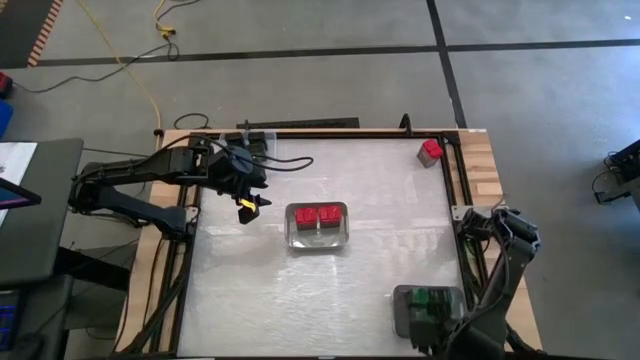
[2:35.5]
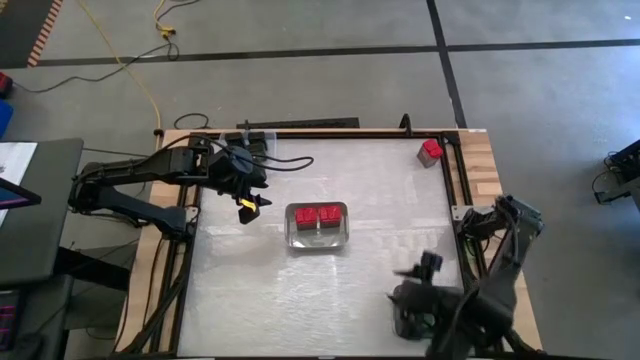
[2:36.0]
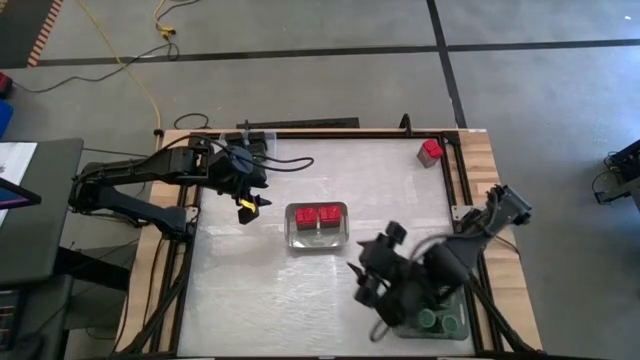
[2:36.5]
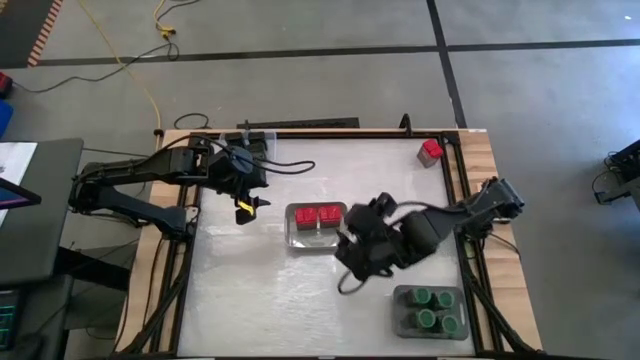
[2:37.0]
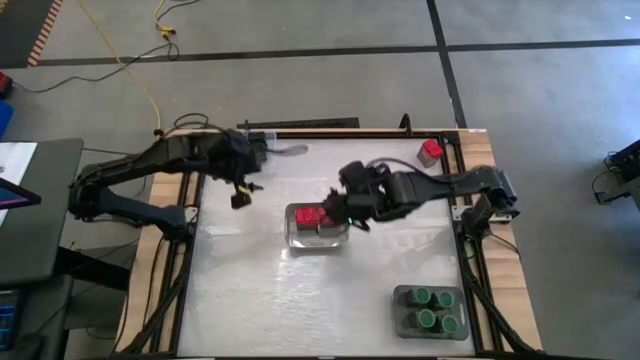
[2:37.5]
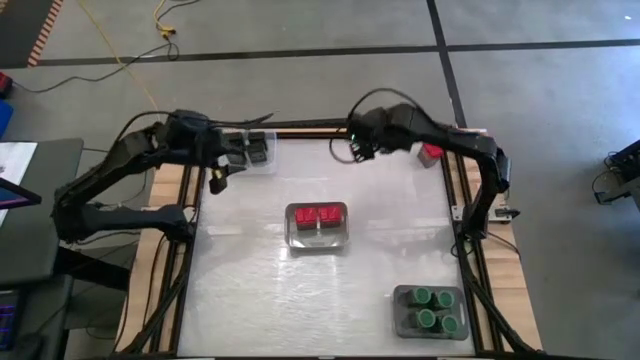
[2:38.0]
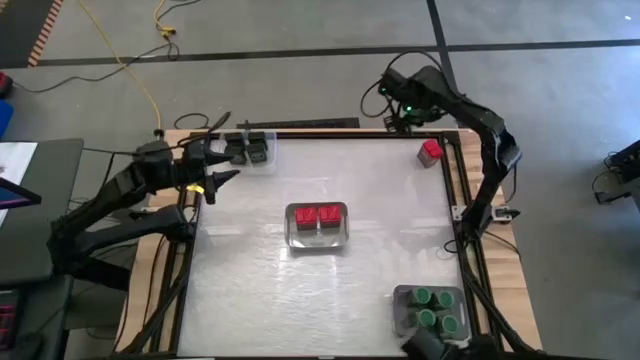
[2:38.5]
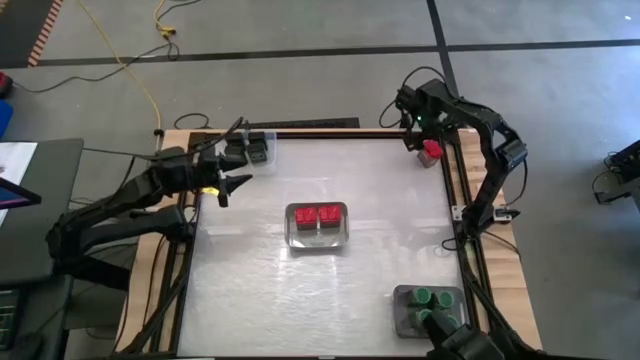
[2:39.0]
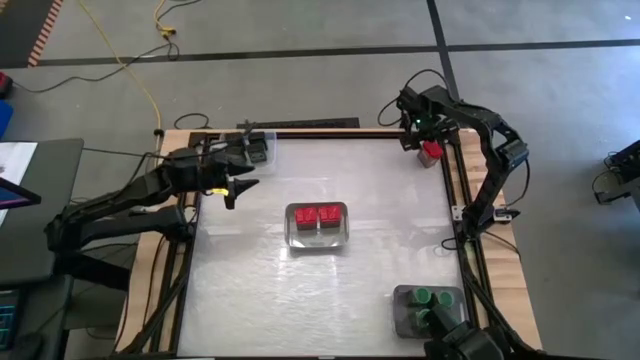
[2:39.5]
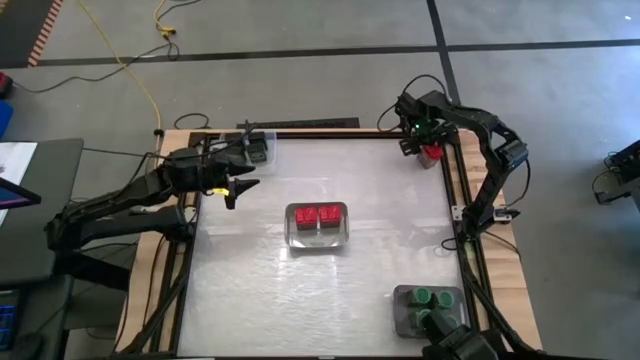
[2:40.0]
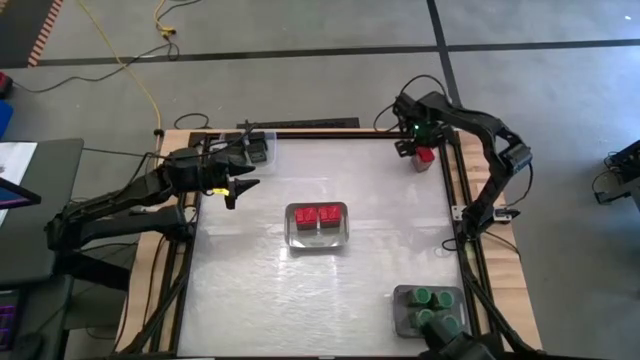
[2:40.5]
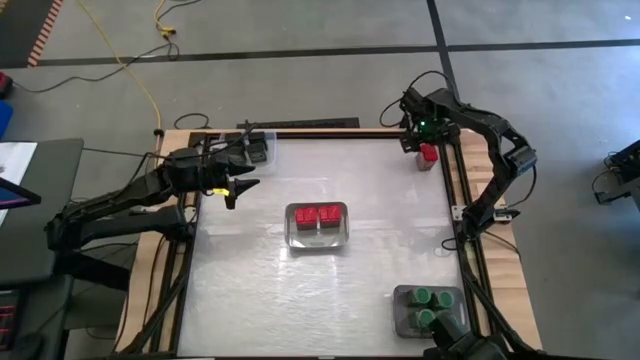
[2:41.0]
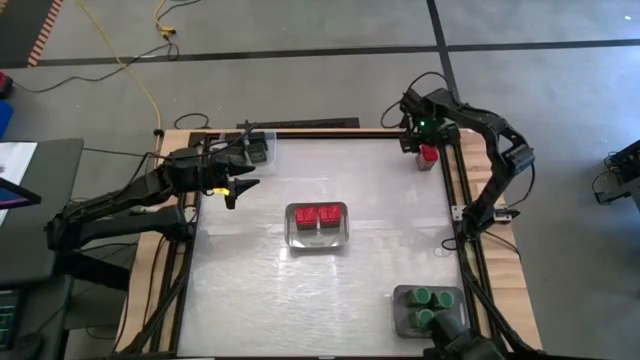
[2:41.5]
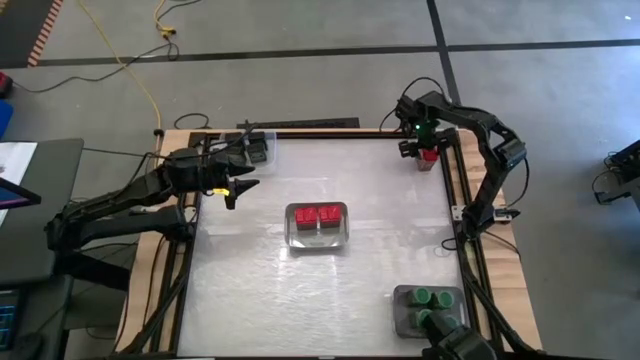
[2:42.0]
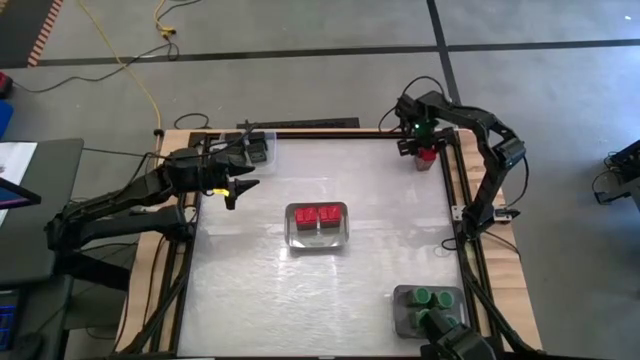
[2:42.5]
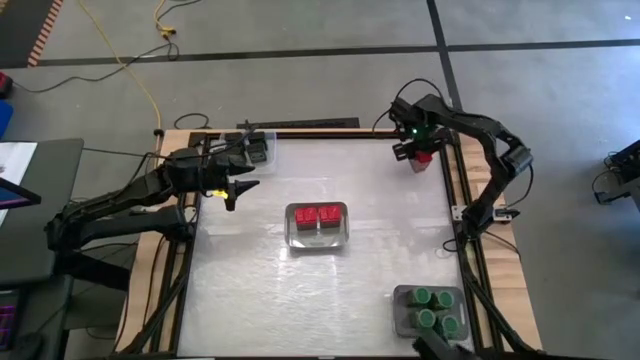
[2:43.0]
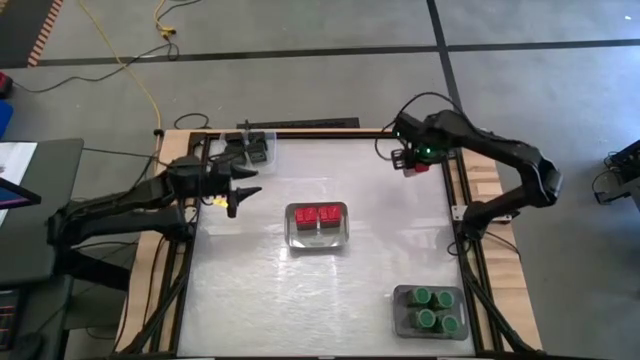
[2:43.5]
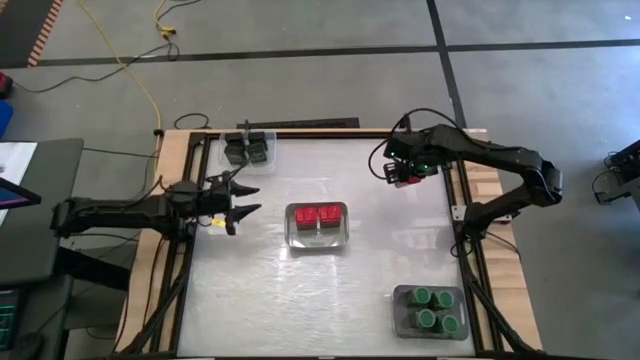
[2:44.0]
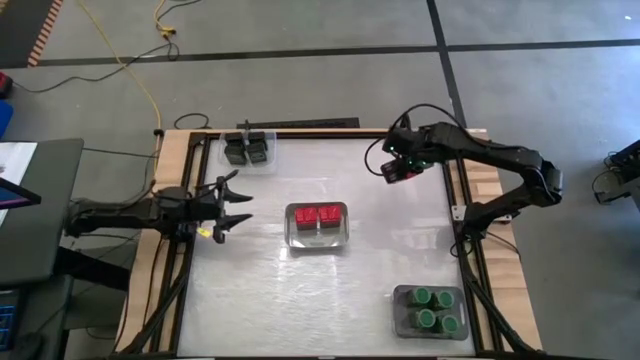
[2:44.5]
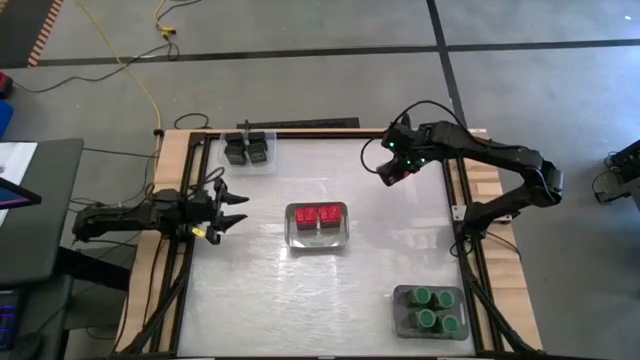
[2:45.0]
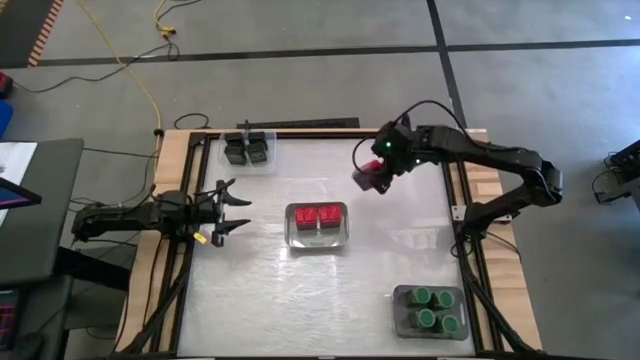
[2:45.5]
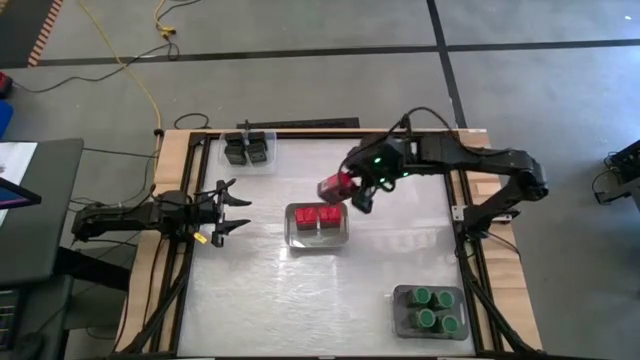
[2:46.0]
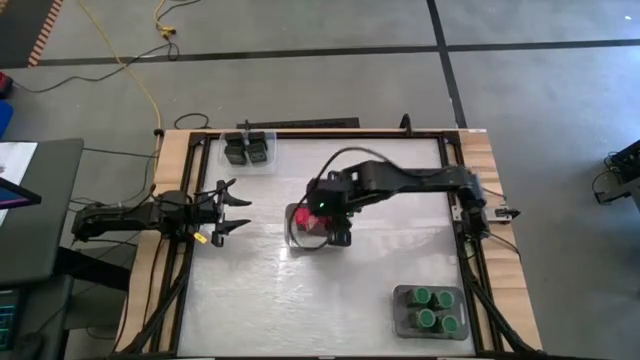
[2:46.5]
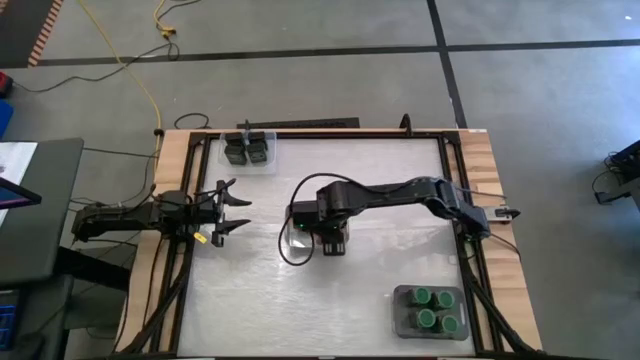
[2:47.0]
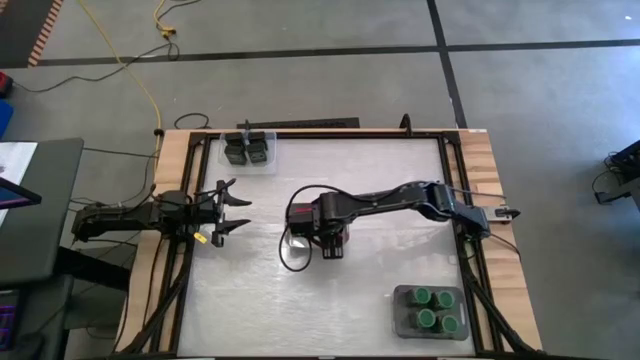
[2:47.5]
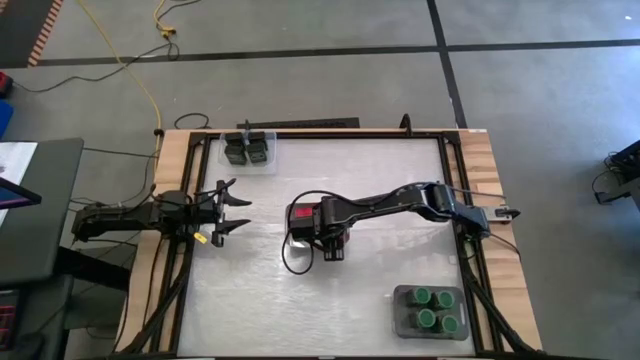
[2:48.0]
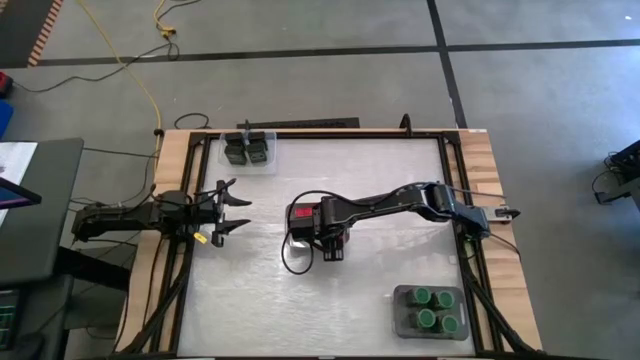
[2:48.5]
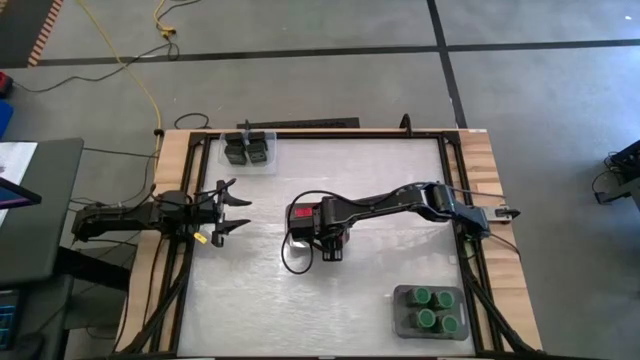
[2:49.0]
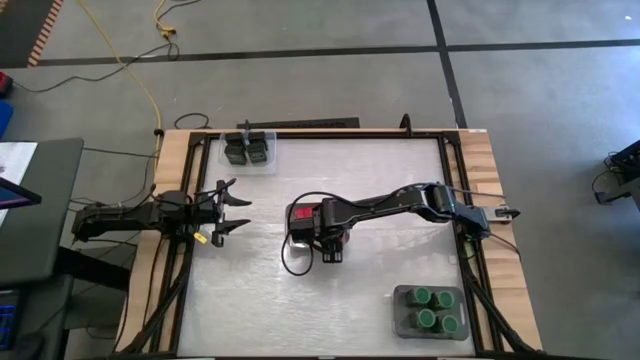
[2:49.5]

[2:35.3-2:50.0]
Task: Sort spices by type
Put the red seasoning can into the gray bin

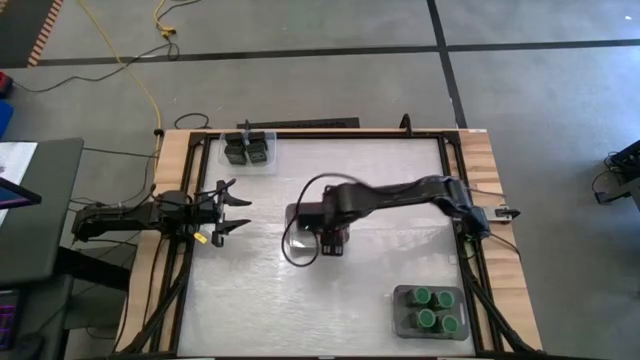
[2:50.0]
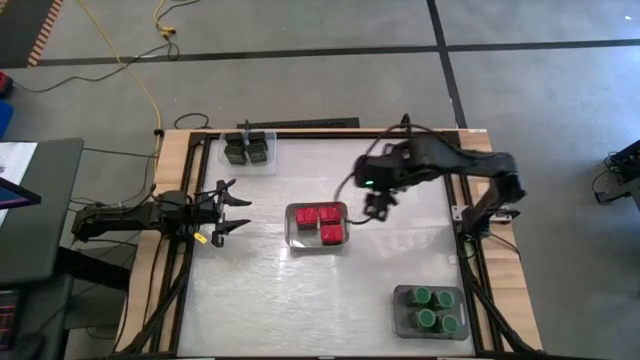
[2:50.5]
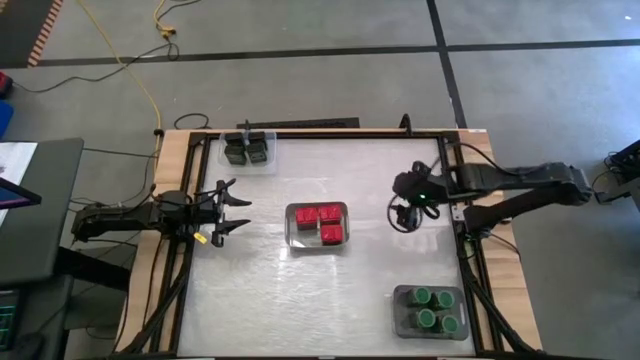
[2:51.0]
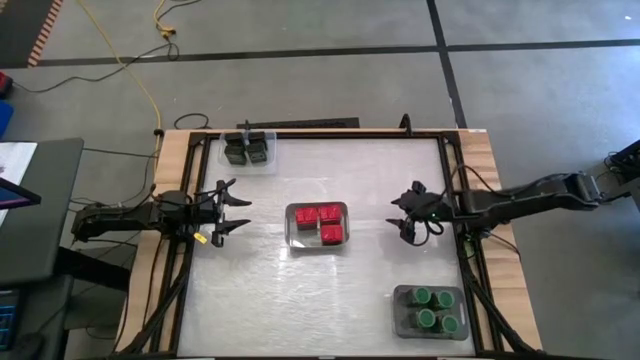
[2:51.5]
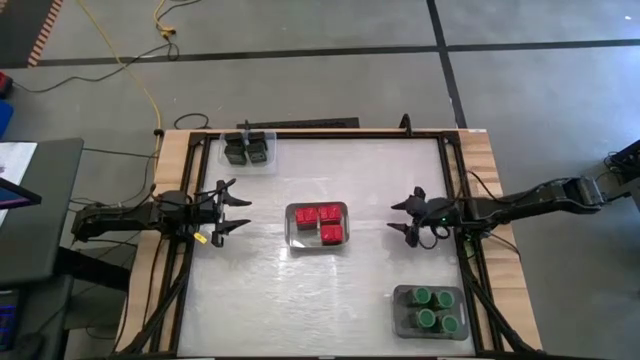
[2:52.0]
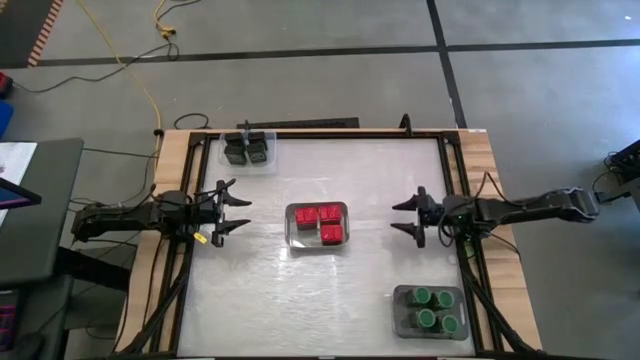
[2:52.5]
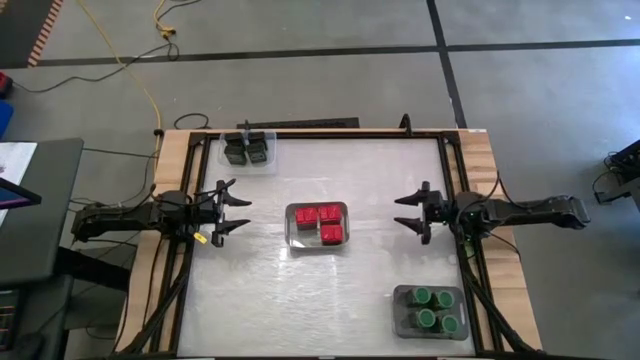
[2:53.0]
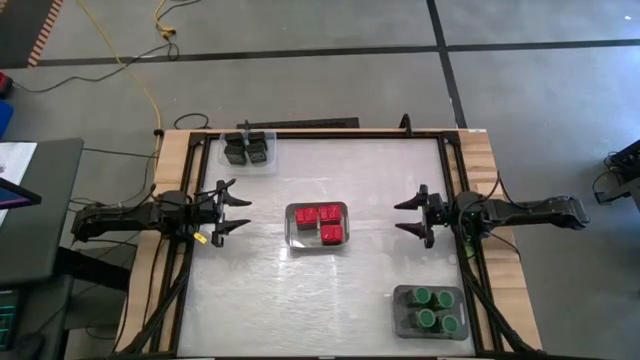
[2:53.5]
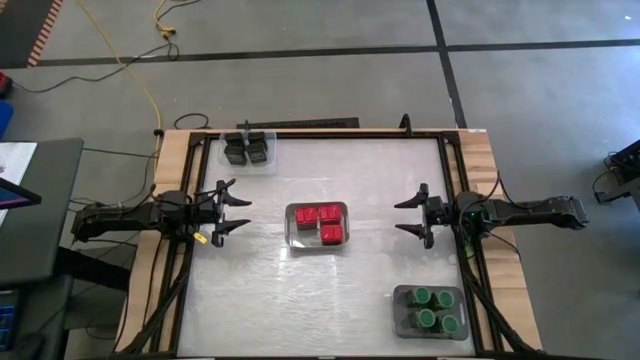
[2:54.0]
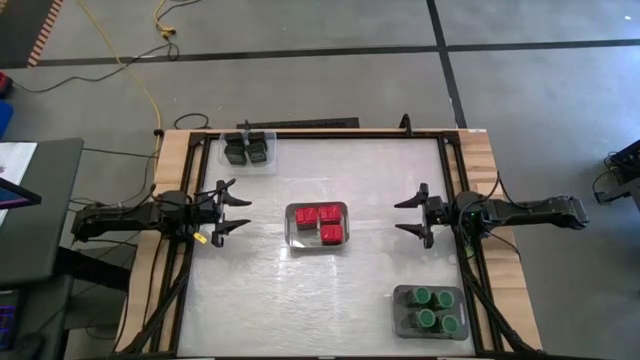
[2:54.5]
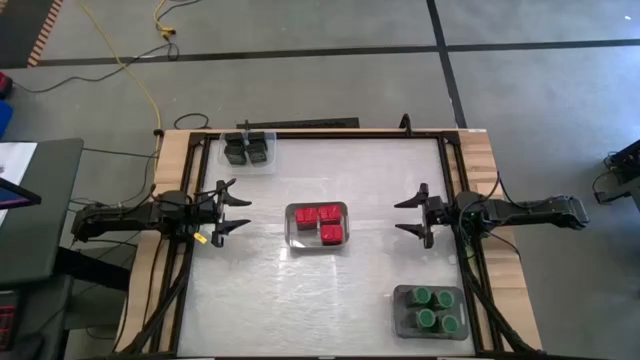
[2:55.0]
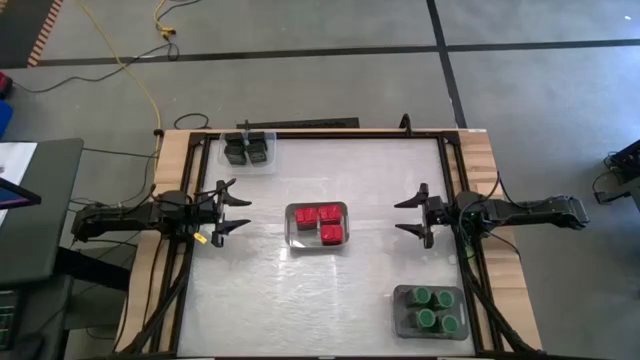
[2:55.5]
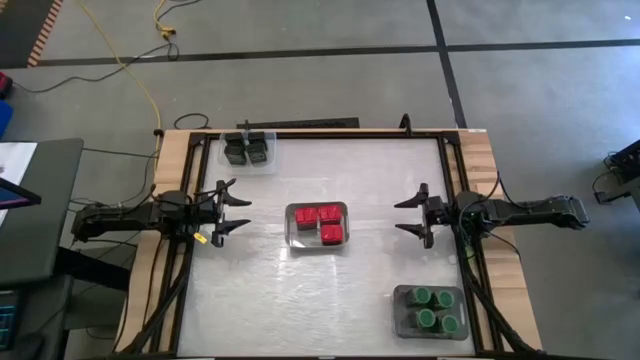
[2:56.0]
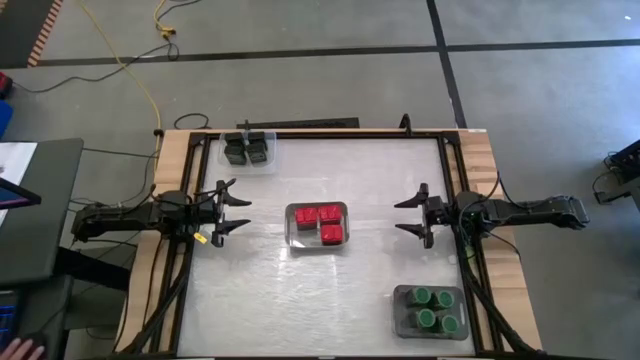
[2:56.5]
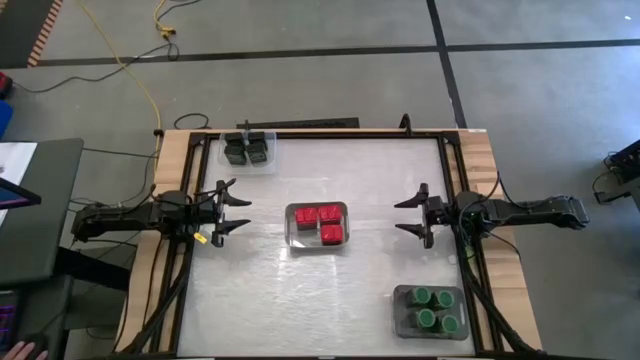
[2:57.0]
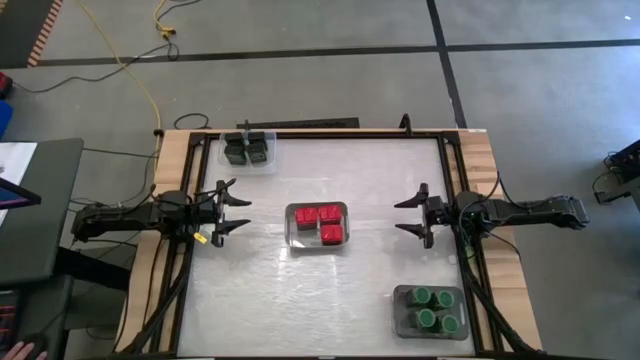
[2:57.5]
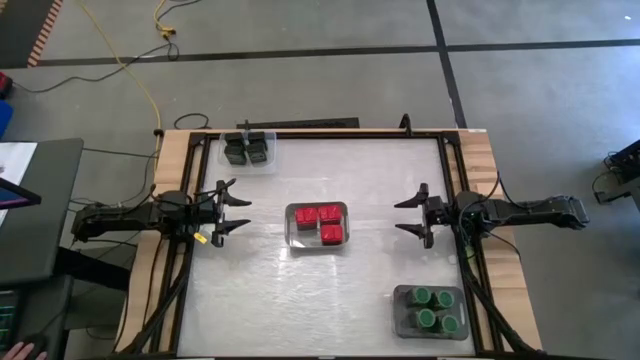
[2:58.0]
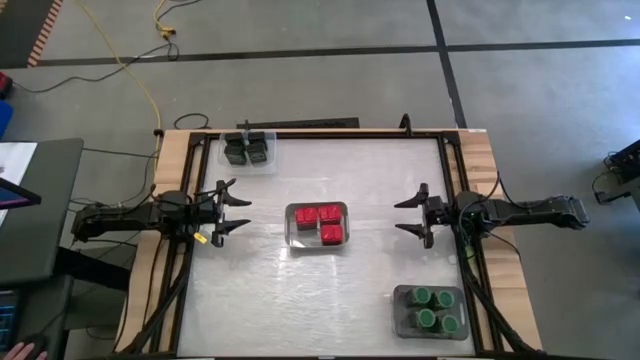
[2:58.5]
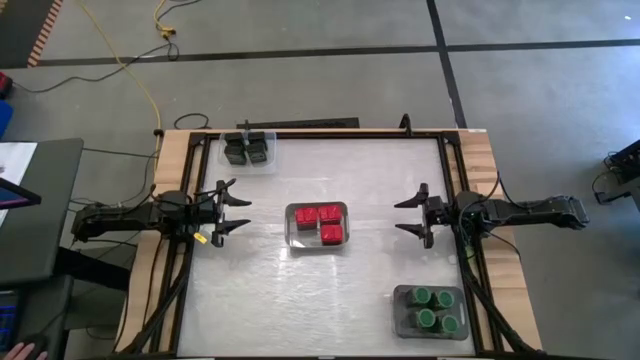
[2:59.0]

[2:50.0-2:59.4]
Return to Home Position
